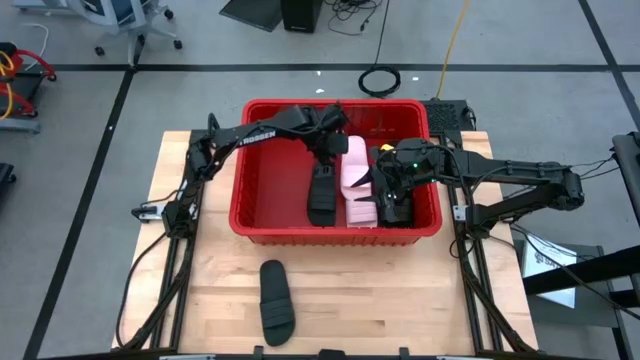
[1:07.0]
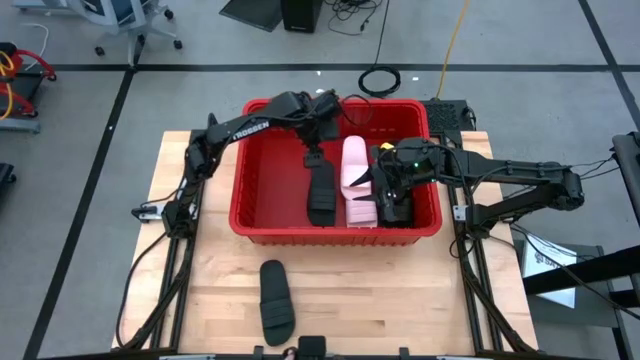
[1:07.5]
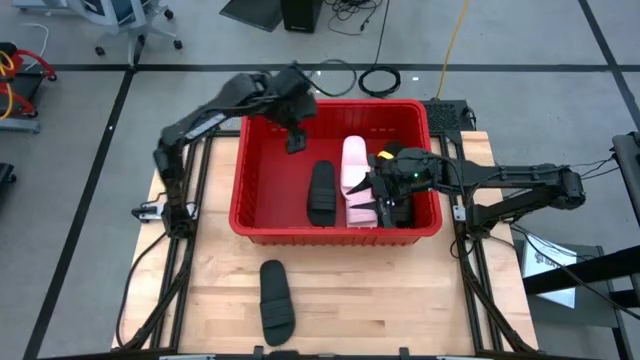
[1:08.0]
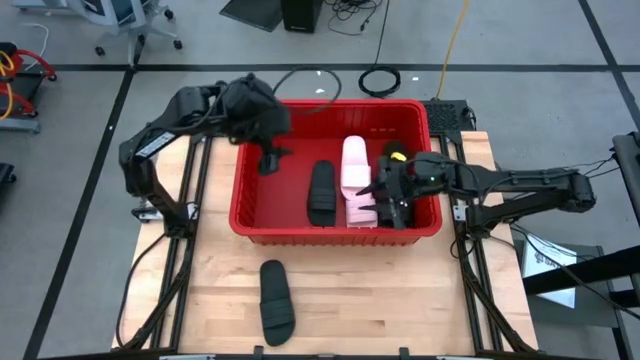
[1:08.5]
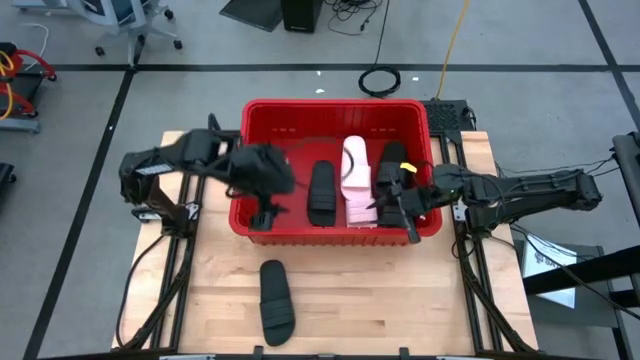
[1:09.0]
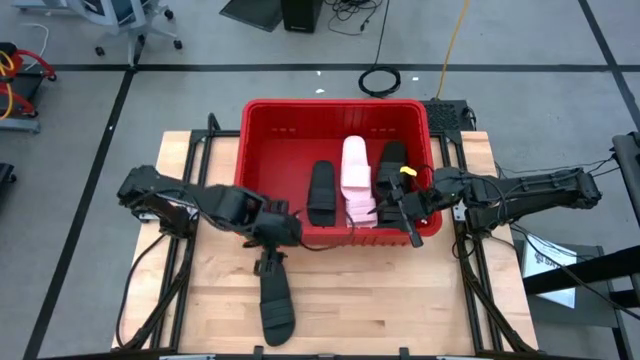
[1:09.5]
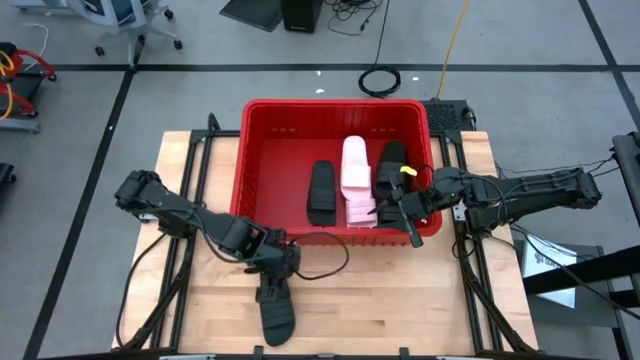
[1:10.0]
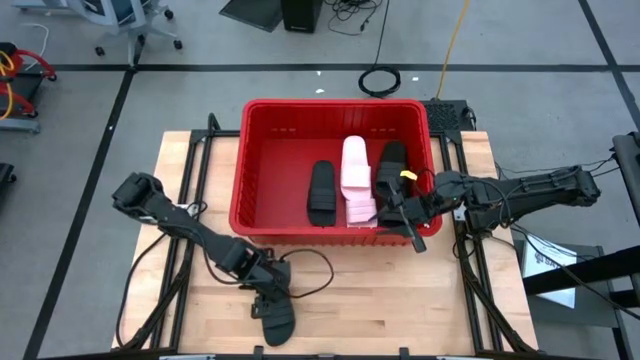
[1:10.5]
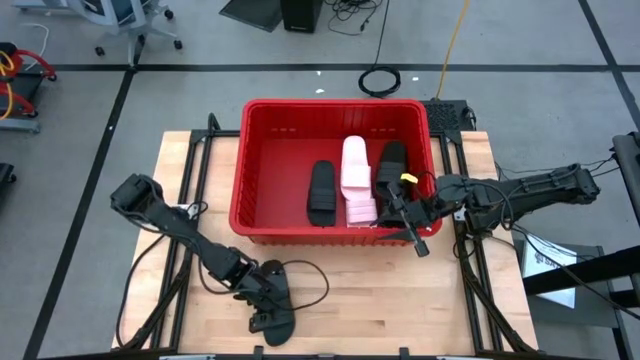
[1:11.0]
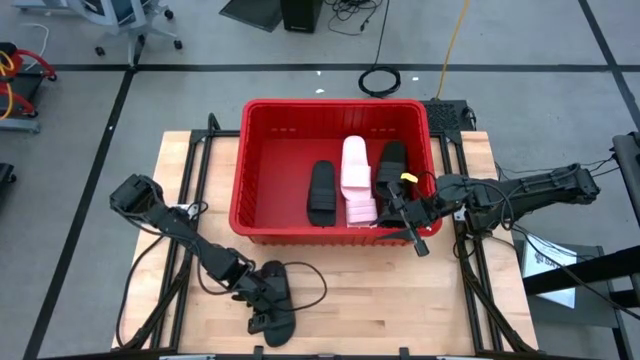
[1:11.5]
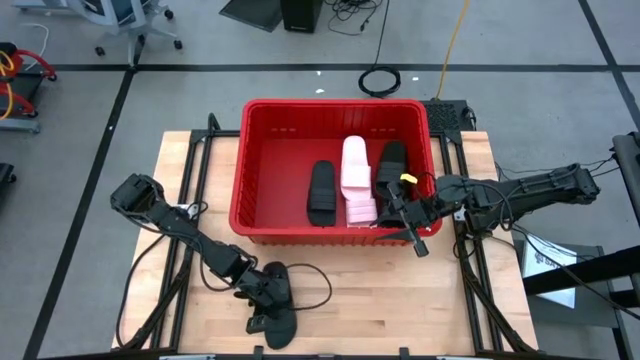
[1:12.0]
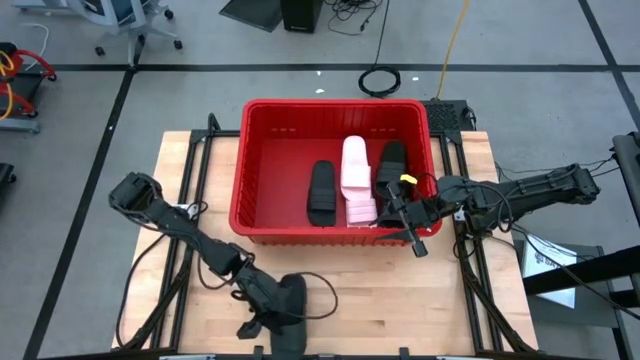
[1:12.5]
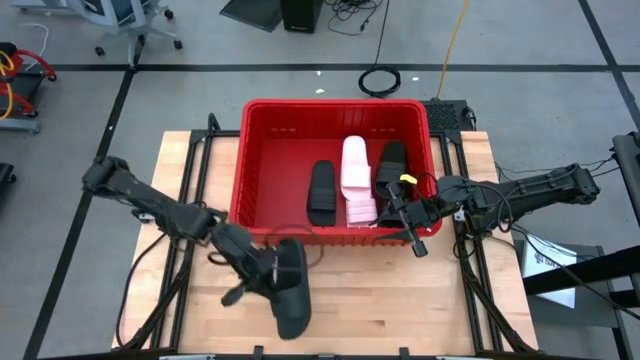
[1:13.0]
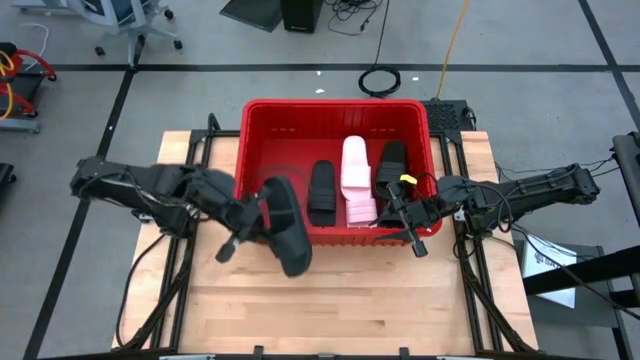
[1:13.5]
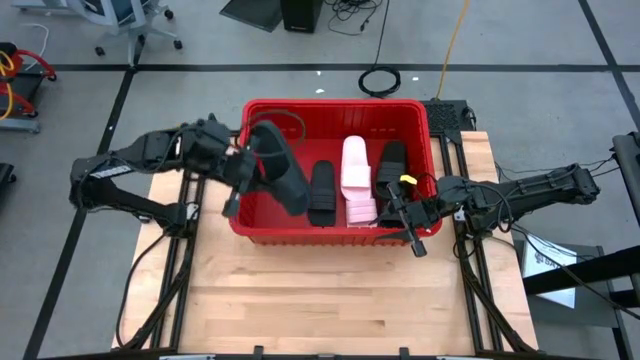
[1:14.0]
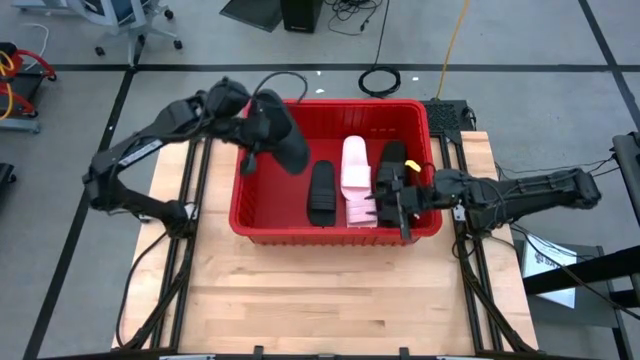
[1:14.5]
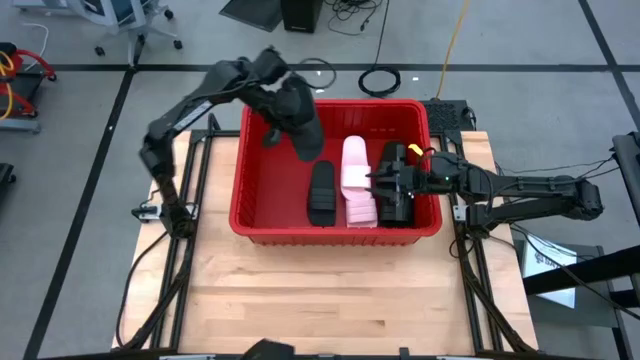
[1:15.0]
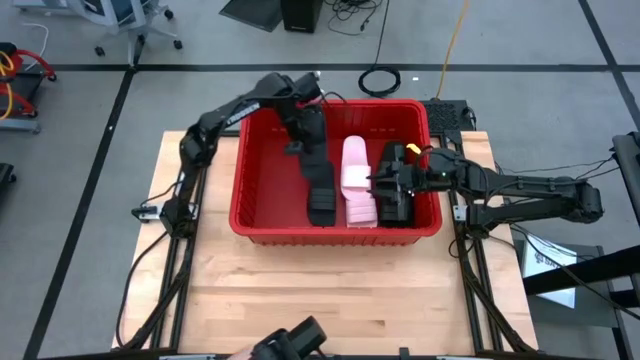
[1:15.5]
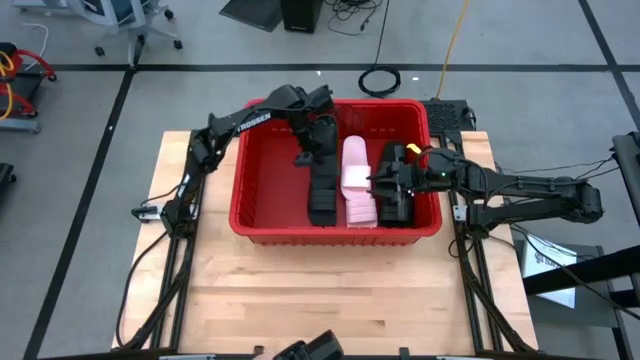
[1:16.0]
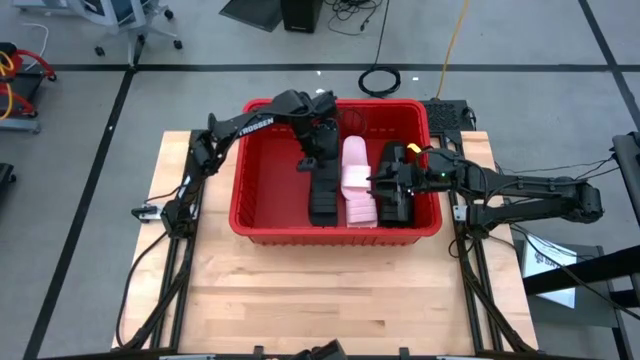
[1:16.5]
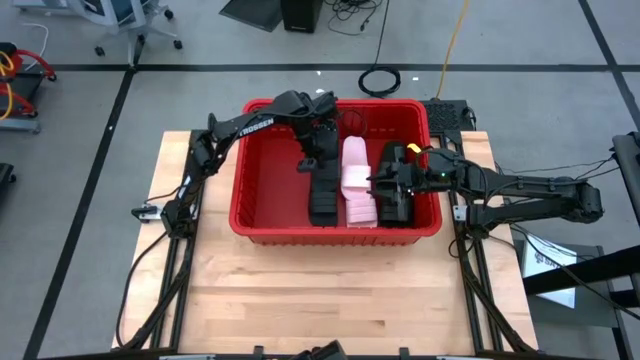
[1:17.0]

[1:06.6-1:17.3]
Task: Pick and place slides into bin
Put the black slide into the red bin

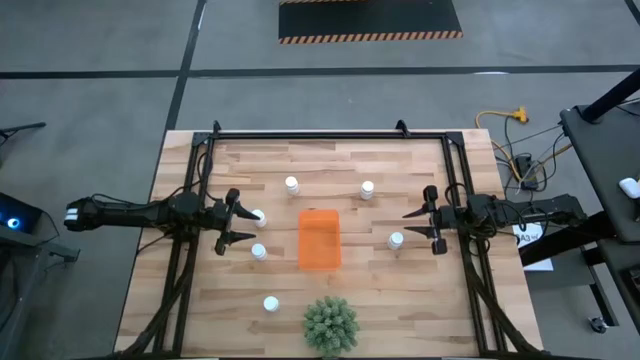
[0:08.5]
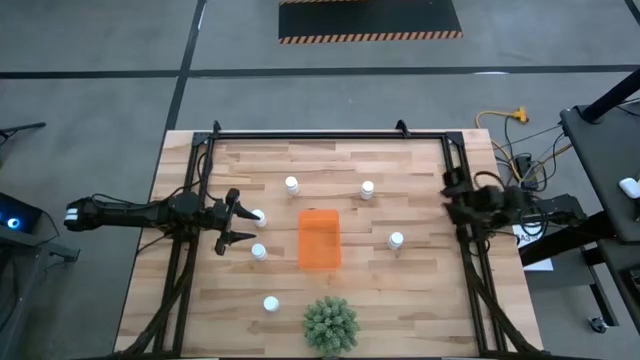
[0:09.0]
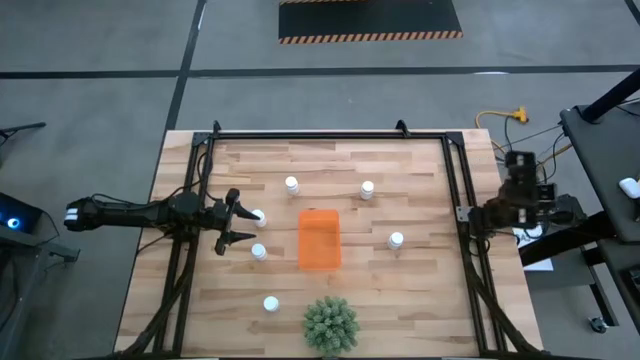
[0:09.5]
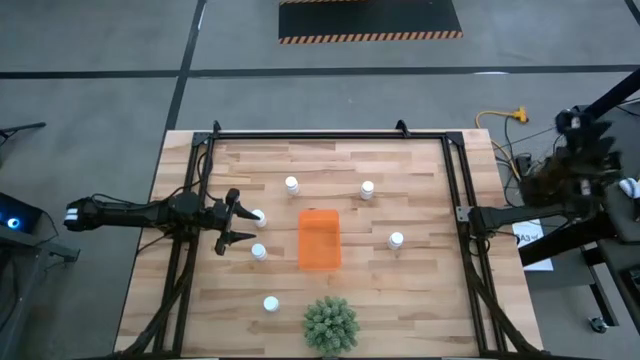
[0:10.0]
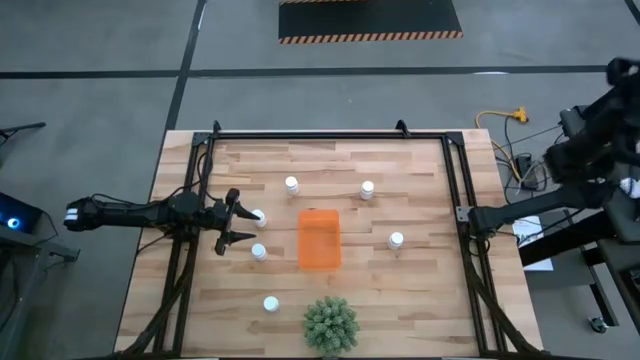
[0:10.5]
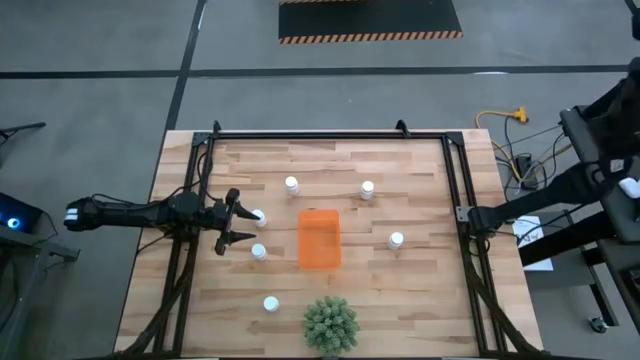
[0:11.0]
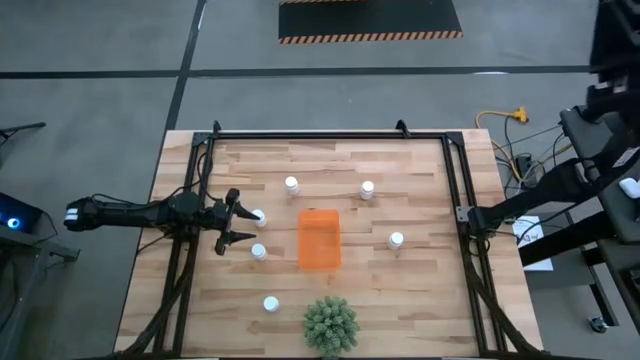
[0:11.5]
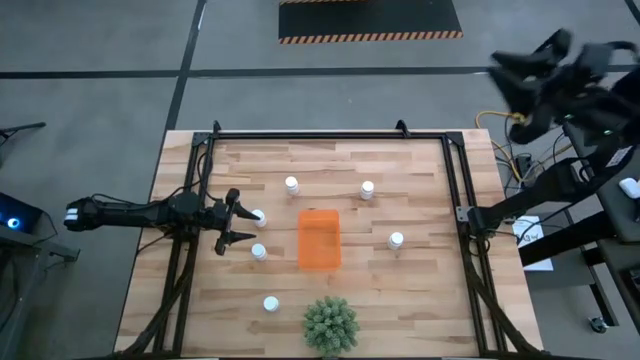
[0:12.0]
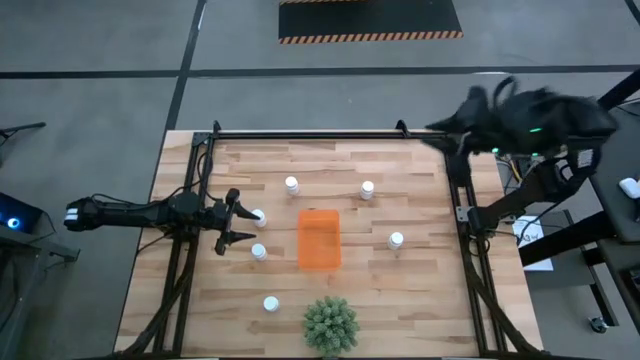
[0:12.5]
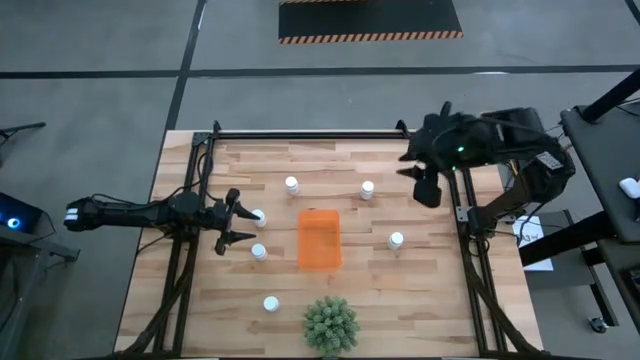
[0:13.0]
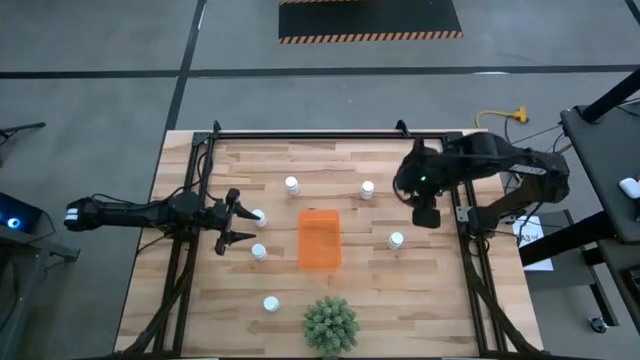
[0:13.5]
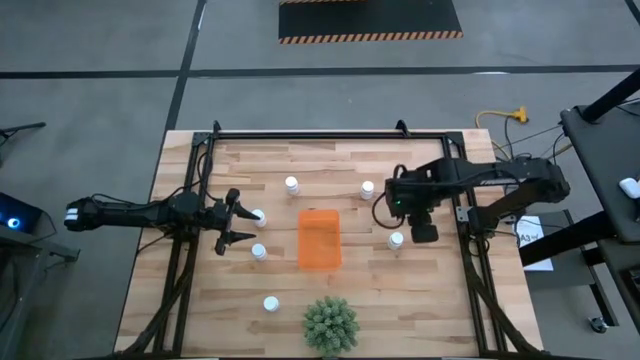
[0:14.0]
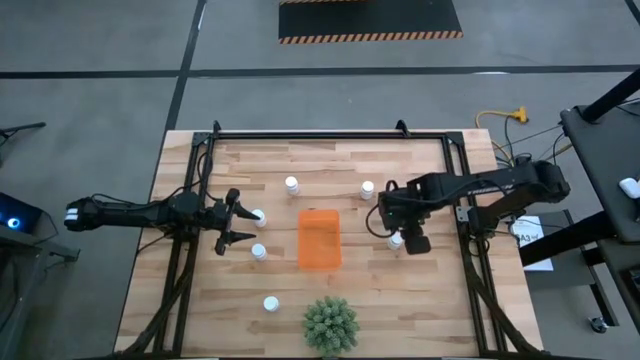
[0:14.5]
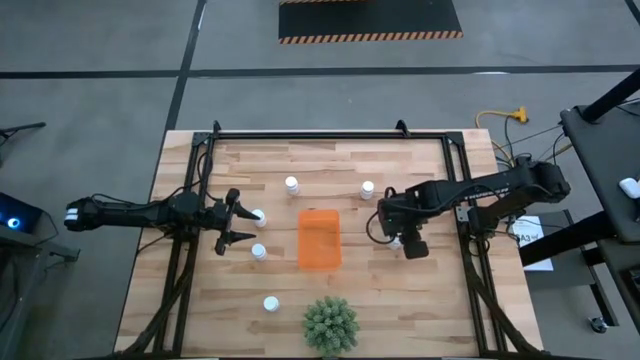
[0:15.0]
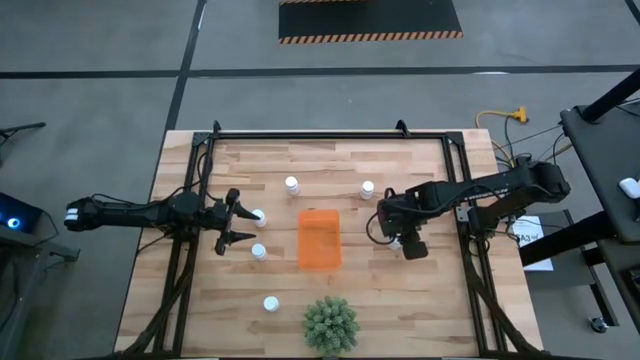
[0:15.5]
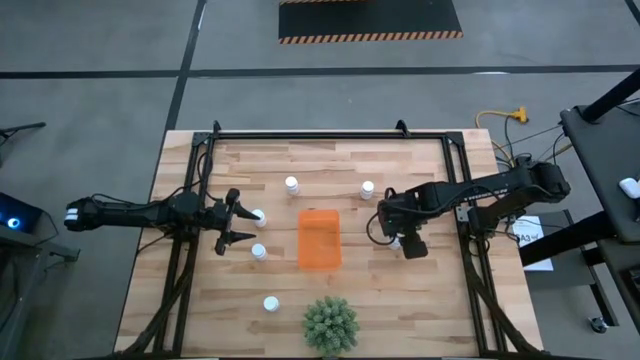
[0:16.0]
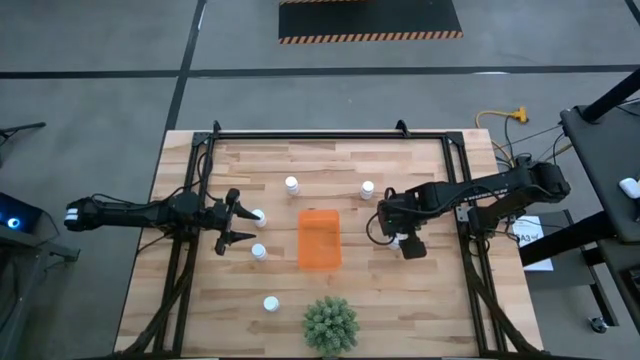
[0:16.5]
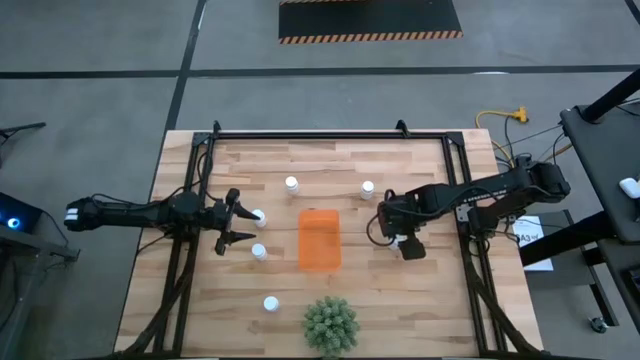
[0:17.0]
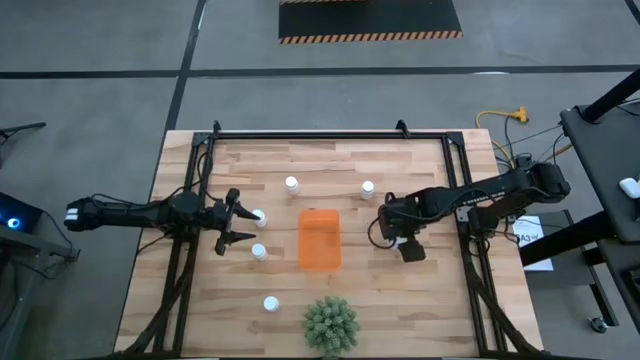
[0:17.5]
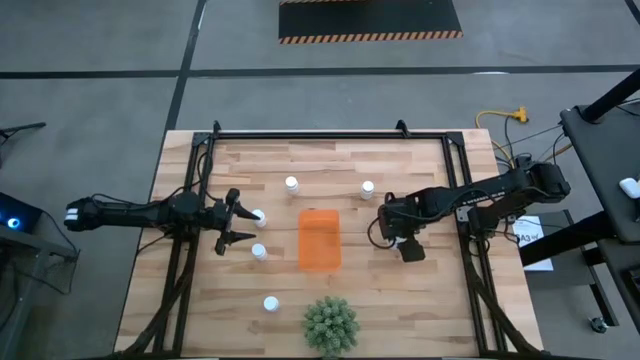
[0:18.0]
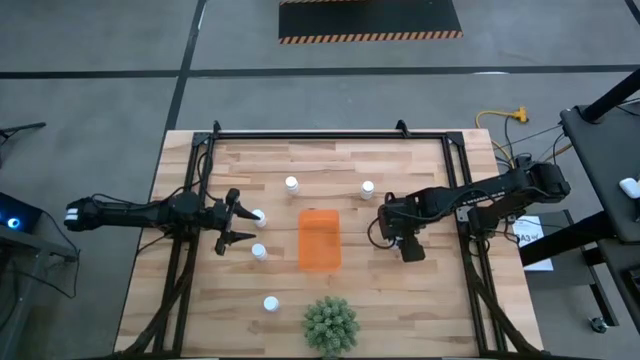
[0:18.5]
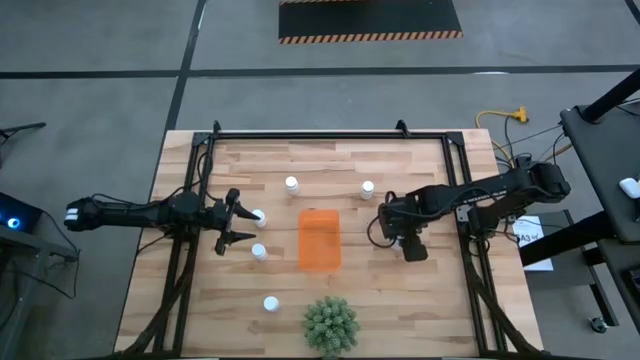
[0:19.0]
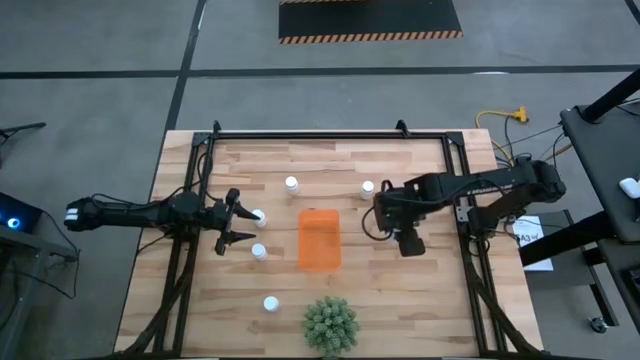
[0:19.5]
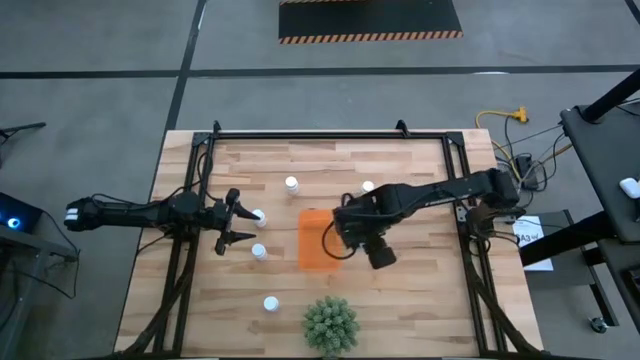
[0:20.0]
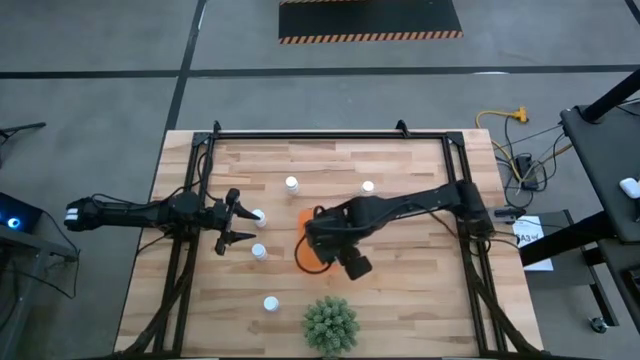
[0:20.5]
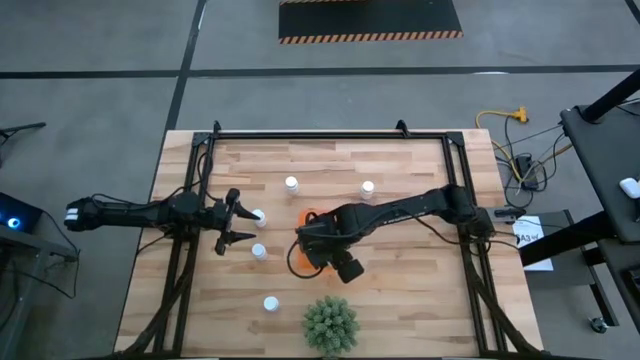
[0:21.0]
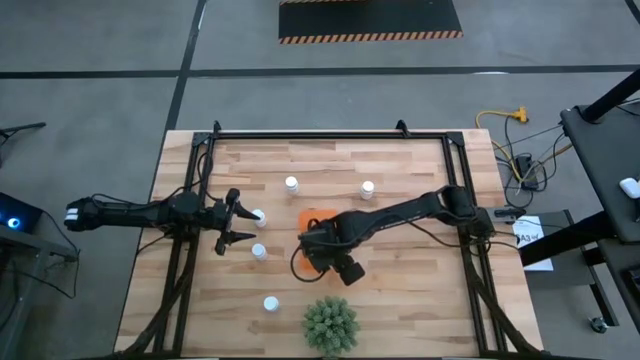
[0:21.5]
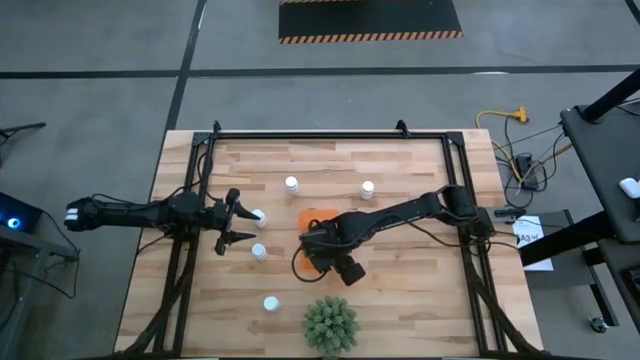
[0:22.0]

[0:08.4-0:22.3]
Task: Pick and place pill bottles into a basket
Put the white pill bottle into the orange bin
